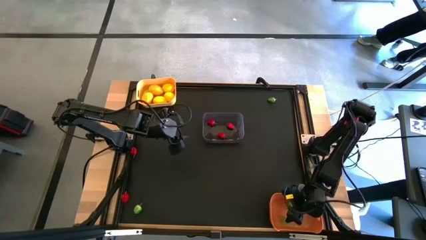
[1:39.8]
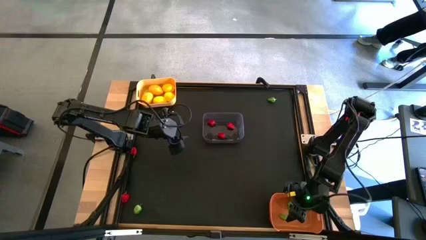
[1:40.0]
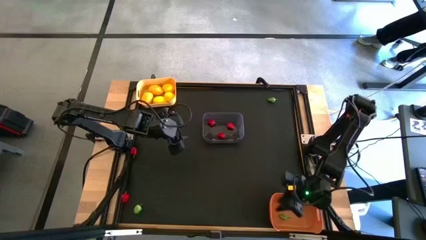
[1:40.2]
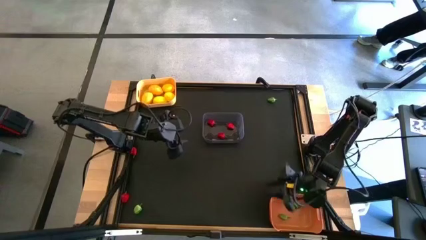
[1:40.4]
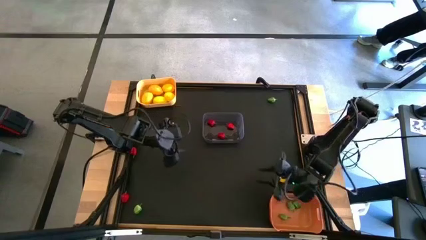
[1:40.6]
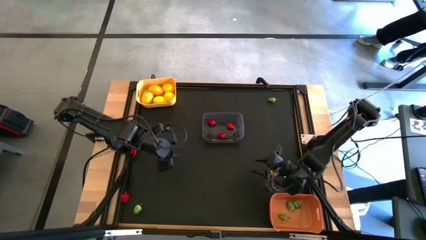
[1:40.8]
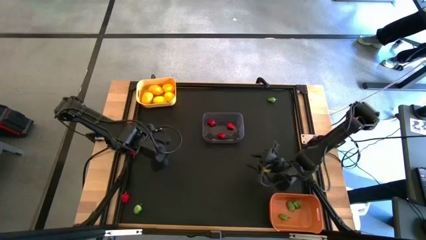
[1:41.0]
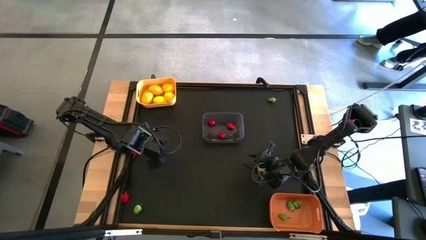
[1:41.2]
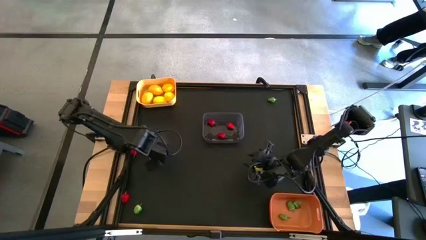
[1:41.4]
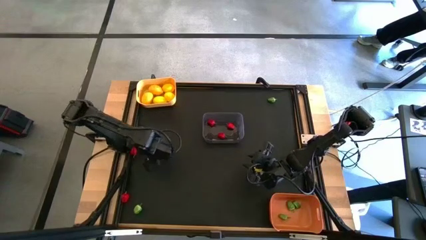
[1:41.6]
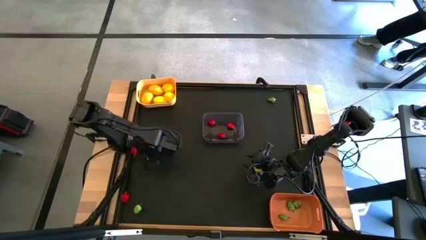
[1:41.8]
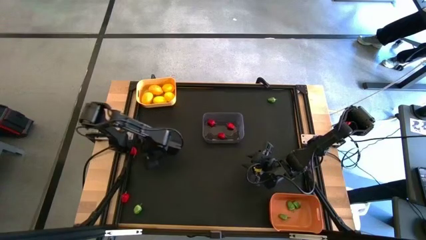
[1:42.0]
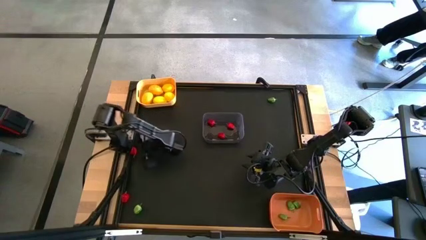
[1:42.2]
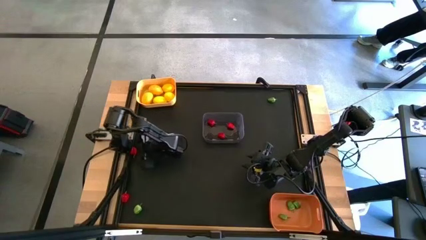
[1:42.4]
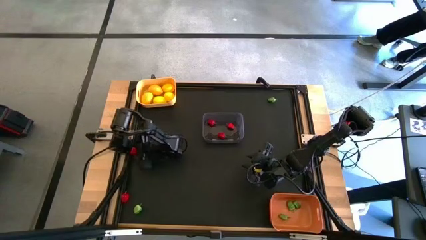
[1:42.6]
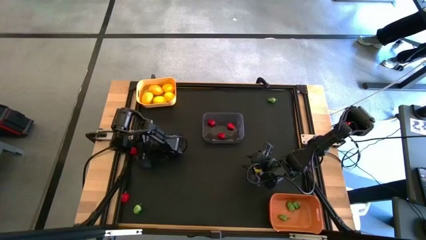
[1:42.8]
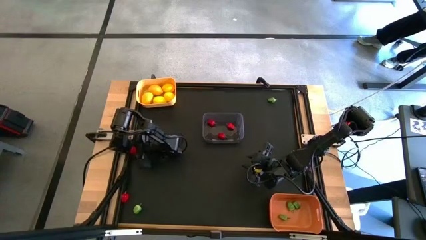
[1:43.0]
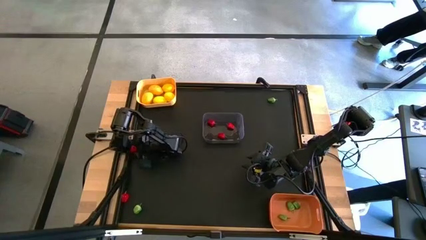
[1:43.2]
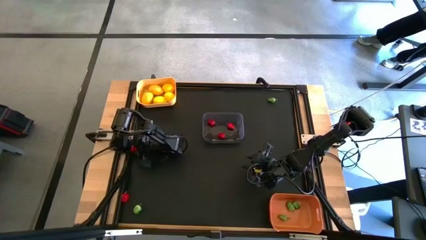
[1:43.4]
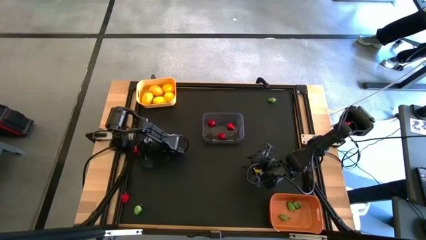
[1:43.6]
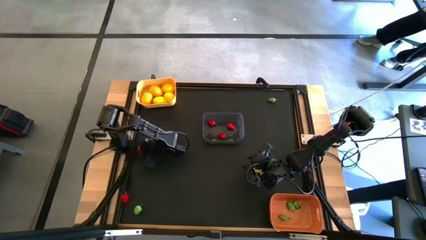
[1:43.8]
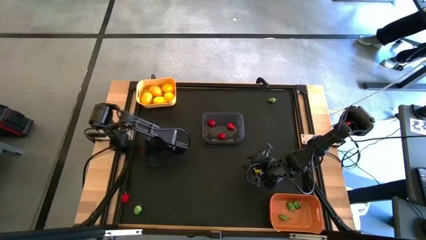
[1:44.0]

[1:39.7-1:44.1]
Task: Sort produce into baskets
Put the red bell pepper into the transparent bin

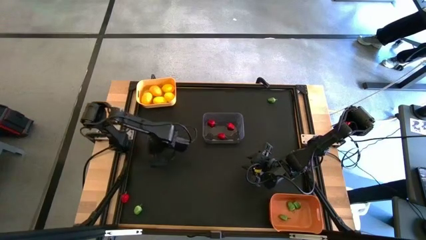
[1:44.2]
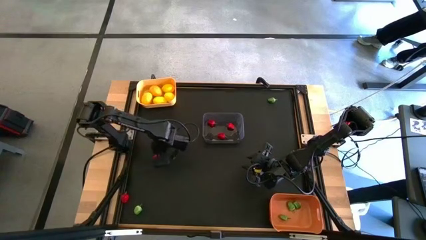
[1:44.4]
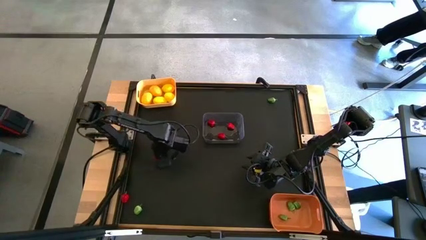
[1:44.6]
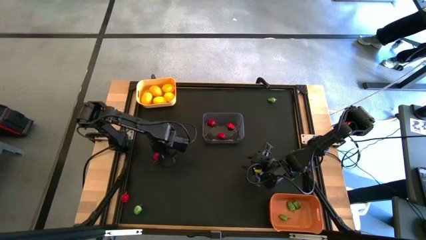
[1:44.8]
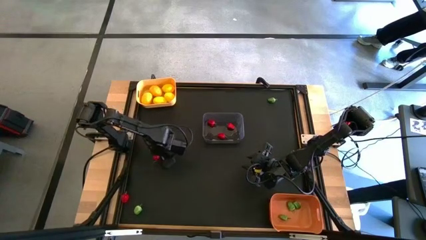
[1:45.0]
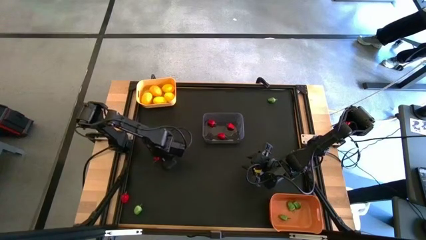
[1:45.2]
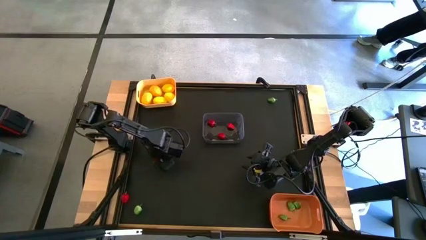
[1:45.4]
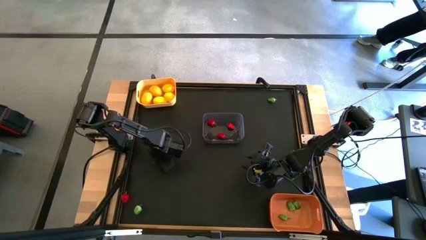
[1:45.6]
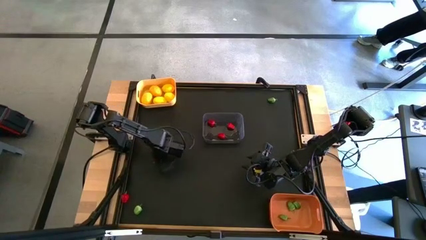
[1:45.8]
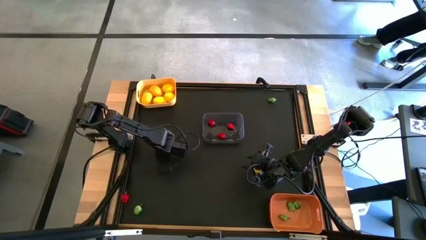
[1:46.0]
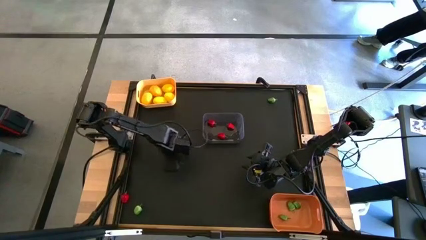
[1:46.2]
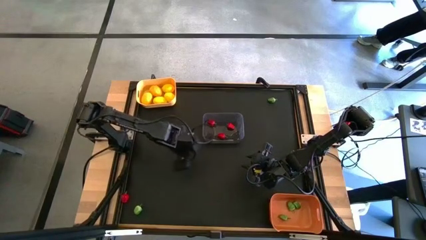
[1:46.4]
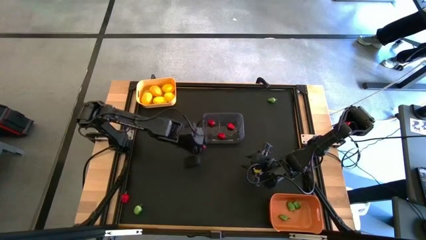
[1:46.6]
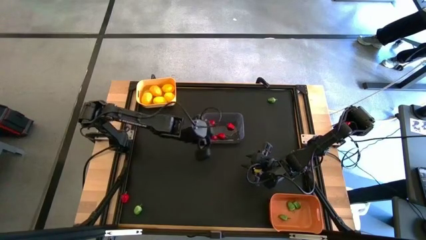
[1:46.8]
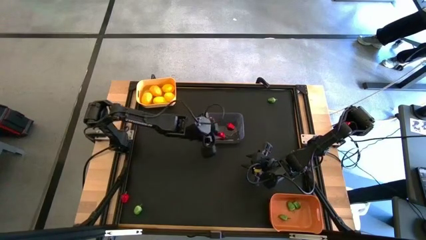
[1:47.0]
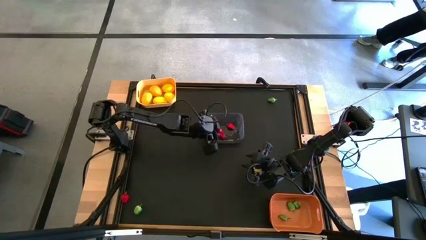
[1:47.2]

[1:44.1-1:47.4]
Put the red bell pepper into the transparent bin

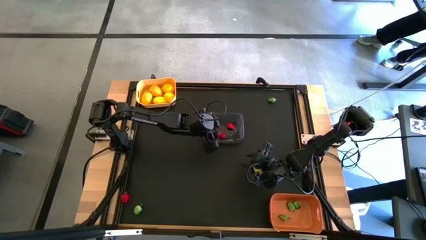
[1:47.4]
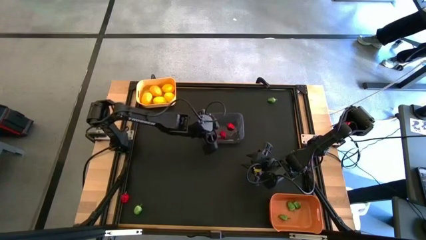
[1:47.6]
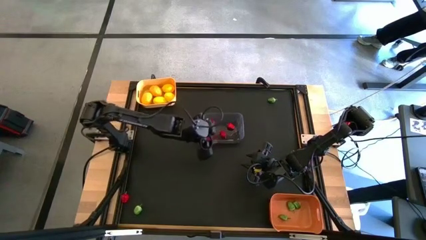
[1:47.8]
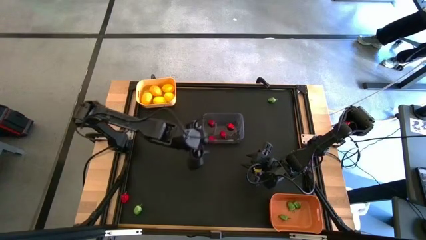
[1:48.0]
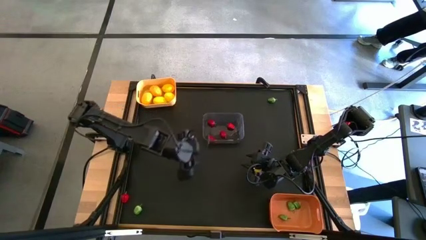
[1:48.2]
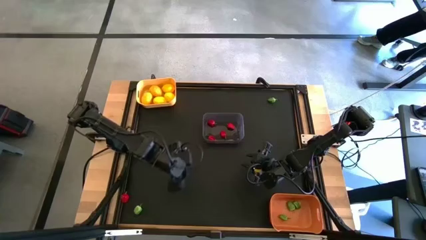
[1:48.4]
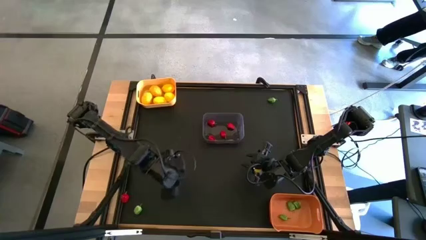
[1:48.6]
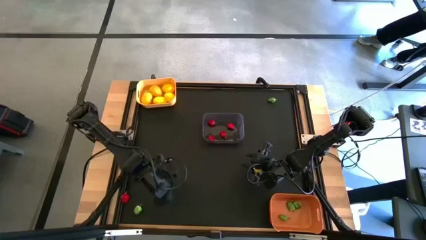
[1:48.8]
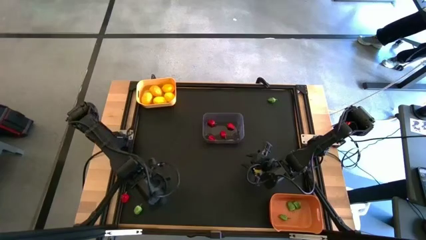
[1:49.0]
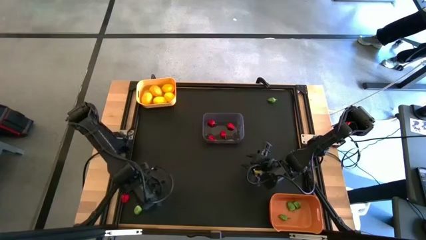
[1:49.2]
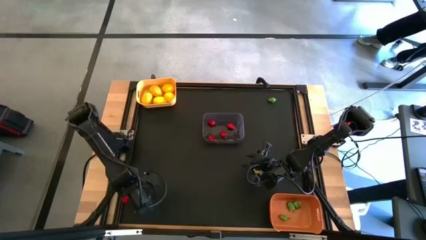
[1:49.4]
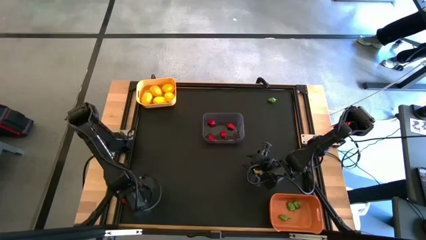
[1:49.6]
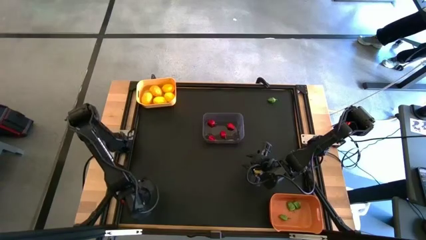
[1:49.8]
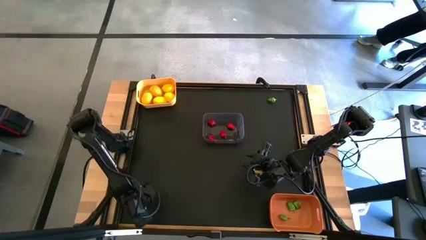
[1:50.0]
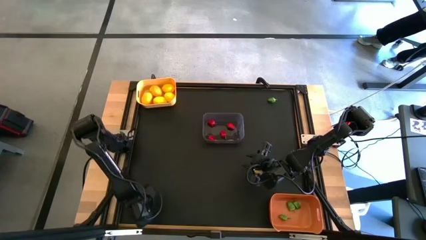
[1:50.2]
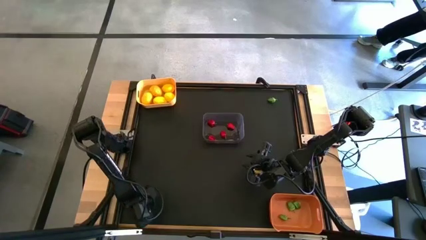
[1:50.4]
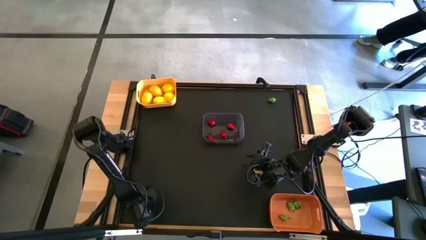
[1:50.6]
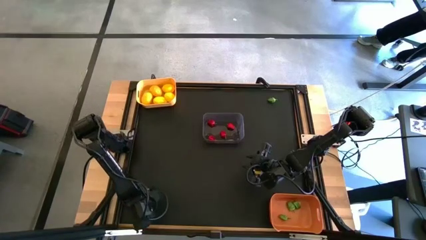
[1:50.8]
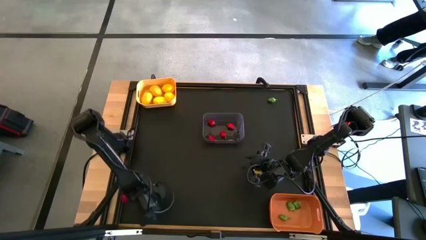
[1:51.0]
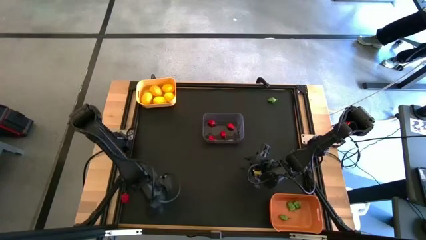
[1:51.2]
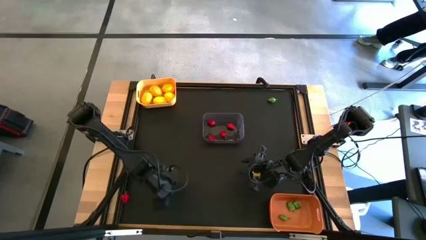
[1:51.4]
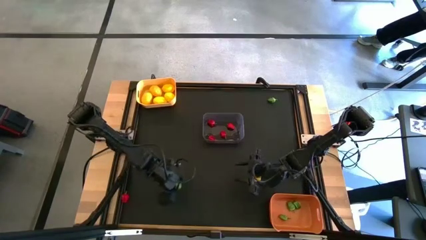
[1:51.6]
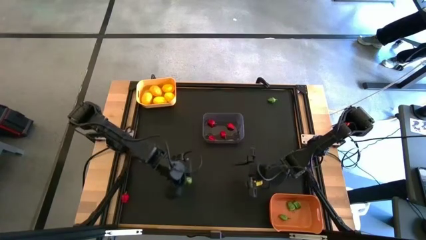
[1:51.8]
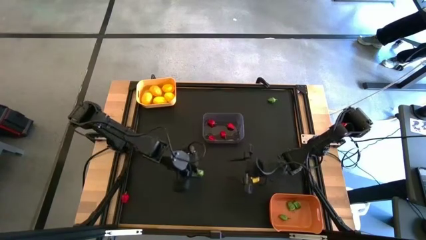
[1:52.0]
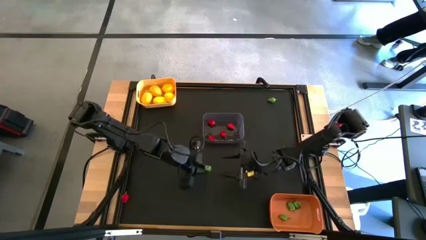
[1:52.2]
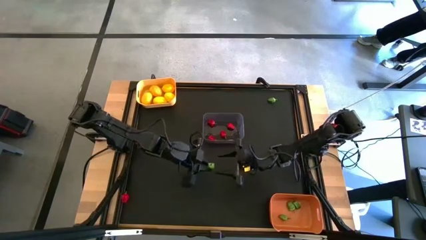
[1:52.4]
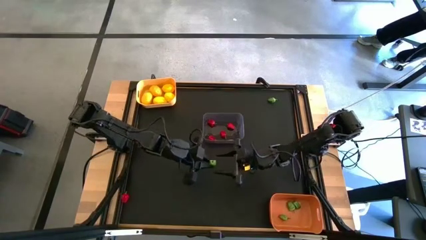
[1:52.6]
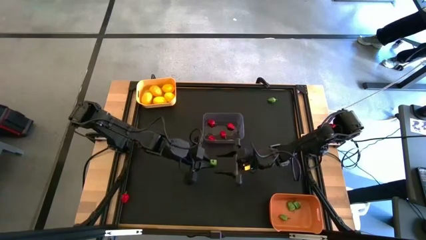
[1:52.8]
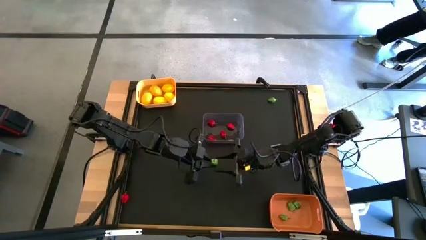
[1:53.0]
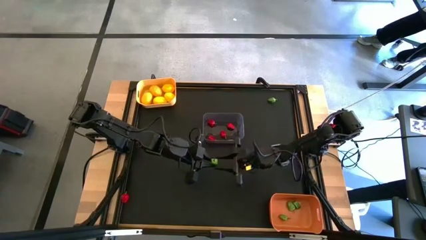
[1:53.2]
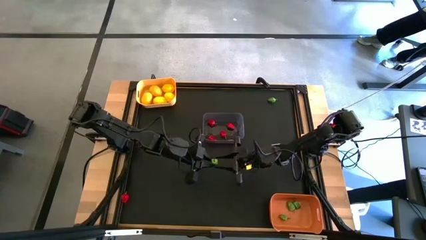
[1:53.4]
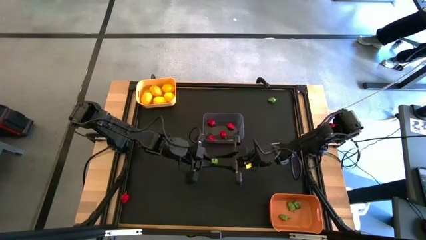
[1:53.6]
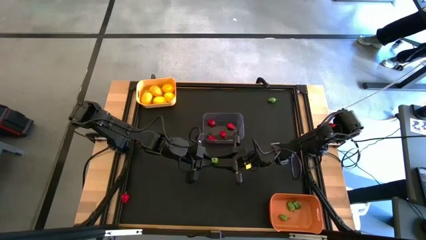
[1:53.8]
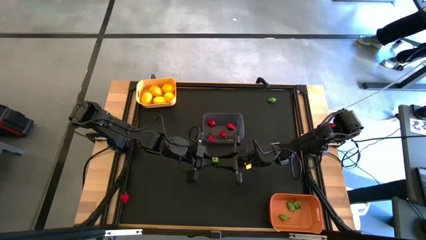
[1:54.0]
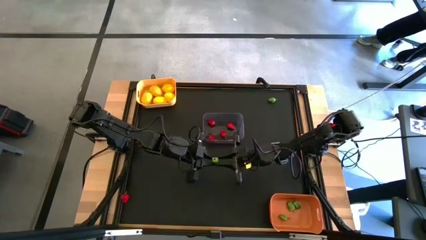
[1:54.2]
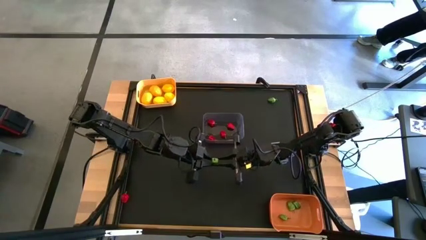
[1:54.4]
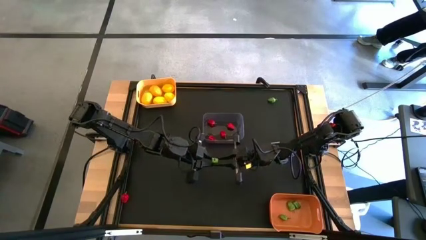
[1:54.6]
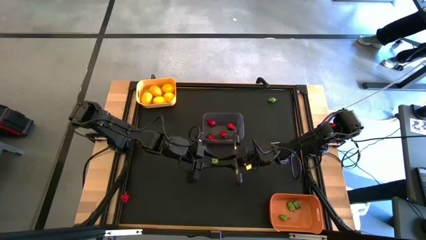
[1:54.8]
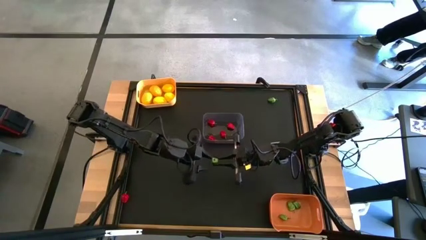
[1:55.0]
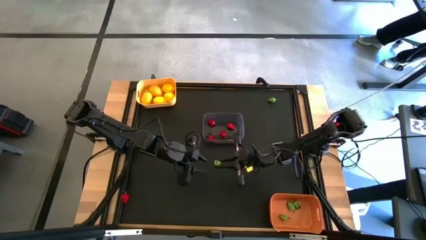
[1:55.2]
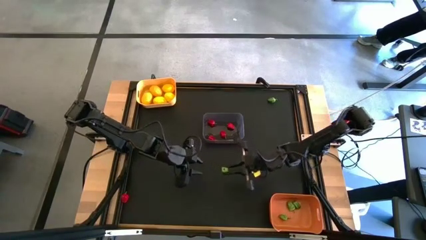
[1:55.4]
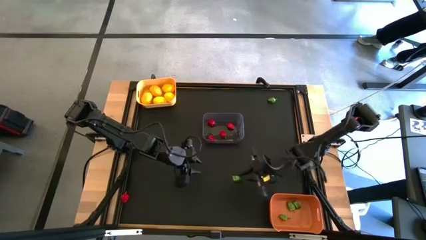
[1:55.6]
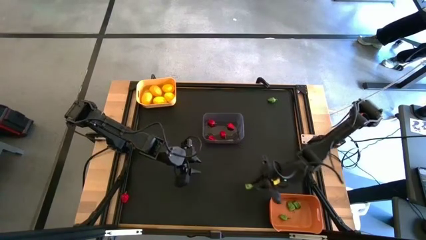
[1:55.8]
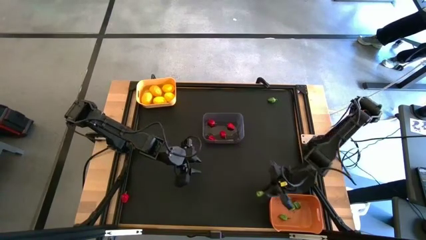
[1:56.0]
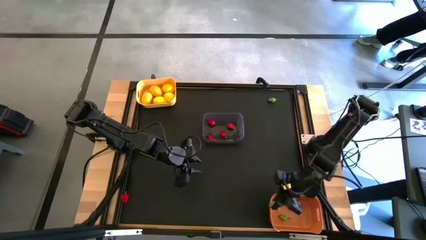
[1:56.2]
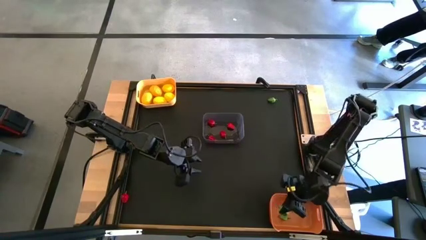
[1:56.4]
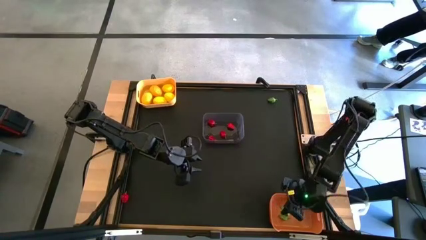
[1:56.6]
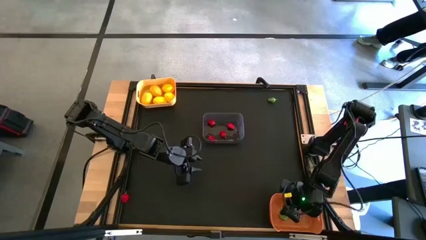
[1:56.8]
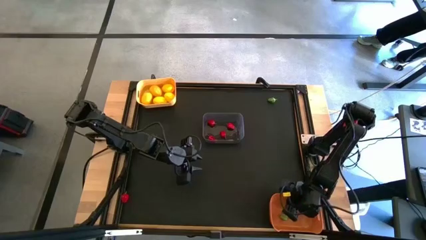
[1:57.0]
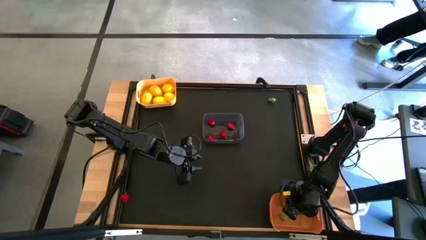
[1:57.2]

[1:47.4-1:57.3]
Put the green bell pepper into the orange bin
